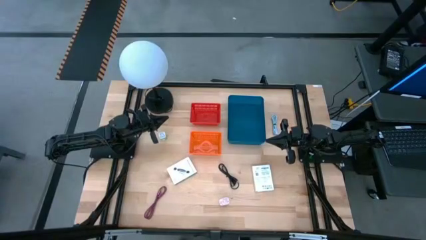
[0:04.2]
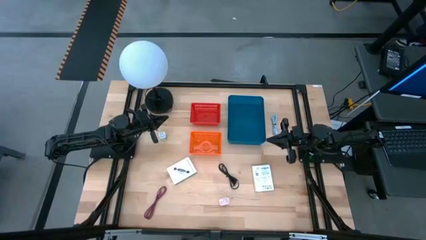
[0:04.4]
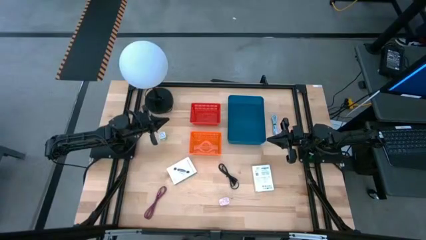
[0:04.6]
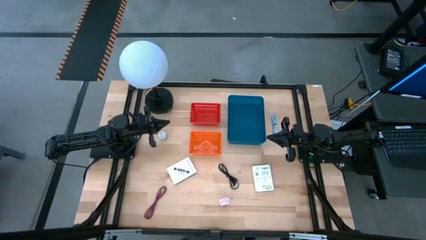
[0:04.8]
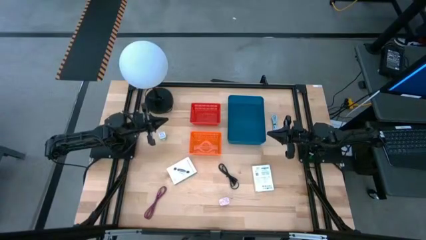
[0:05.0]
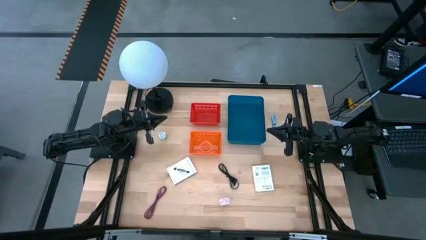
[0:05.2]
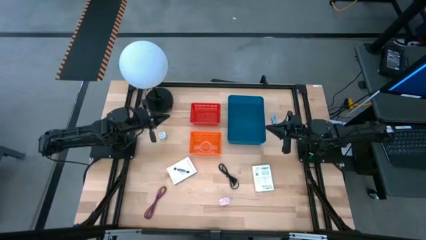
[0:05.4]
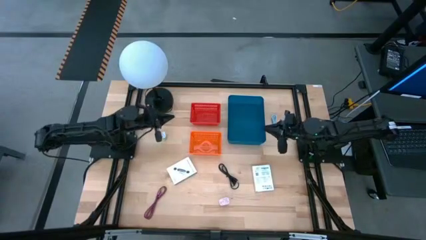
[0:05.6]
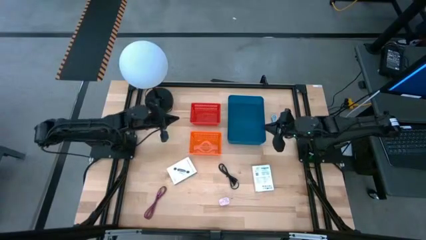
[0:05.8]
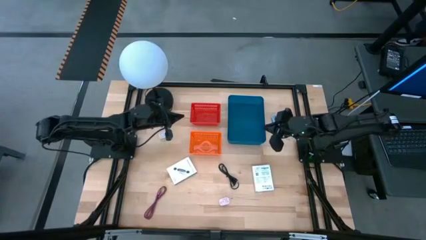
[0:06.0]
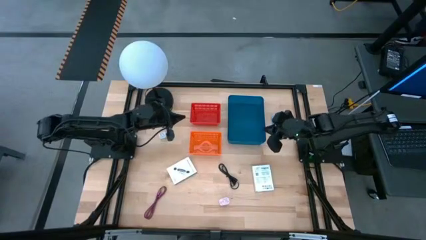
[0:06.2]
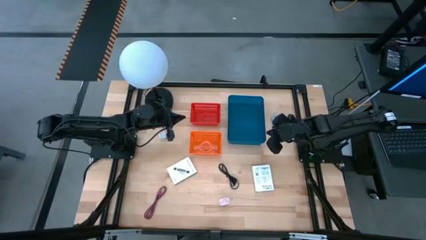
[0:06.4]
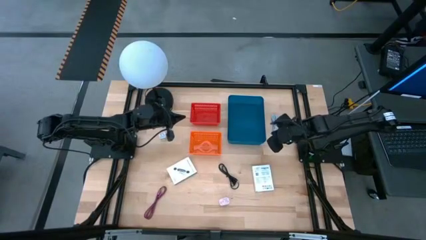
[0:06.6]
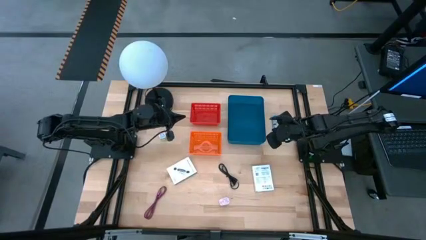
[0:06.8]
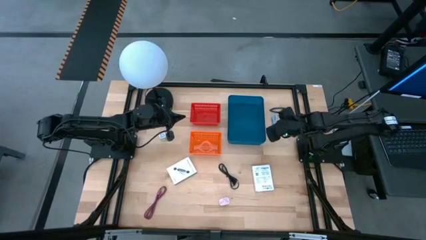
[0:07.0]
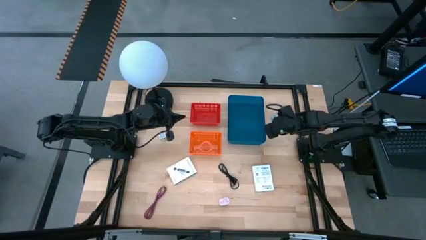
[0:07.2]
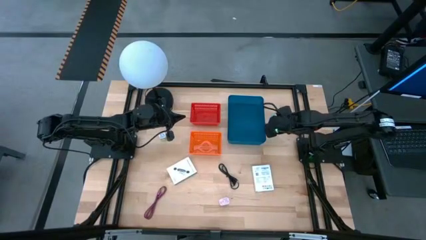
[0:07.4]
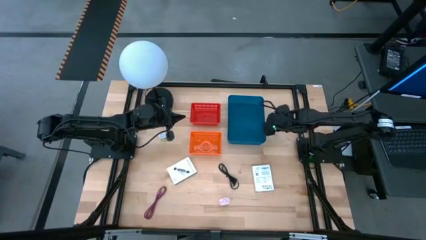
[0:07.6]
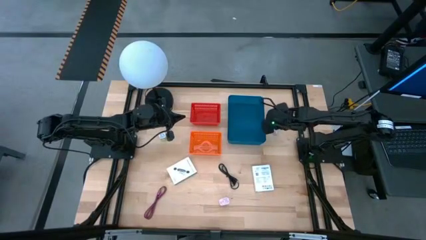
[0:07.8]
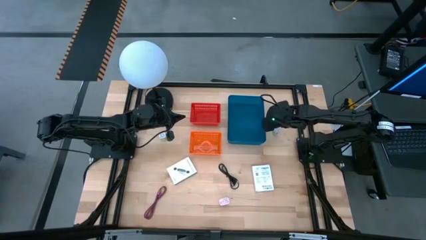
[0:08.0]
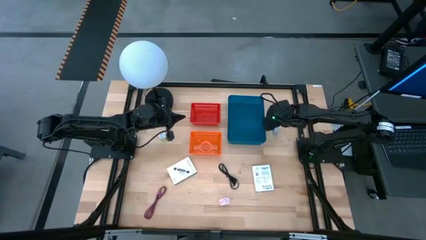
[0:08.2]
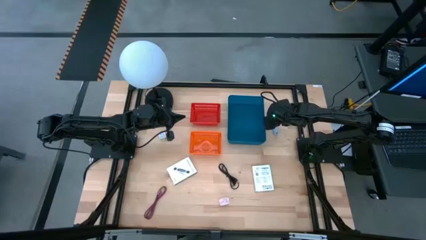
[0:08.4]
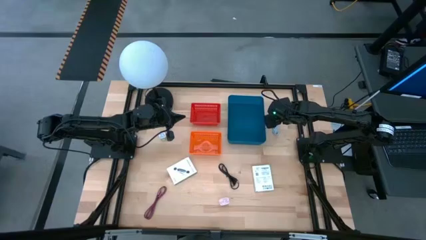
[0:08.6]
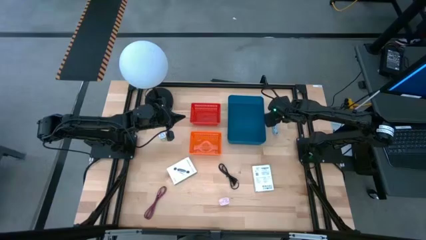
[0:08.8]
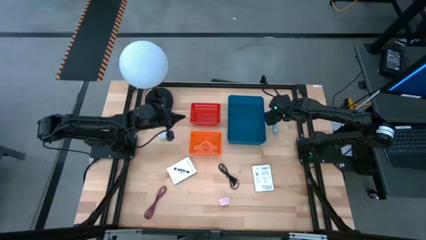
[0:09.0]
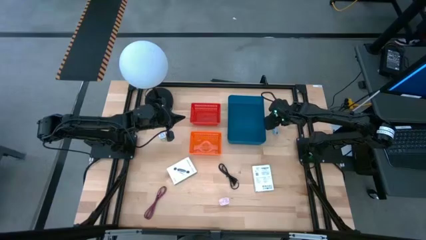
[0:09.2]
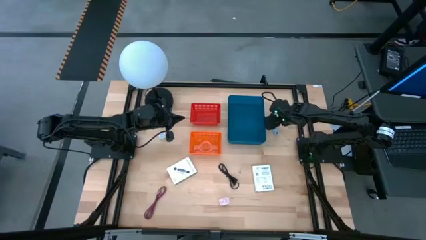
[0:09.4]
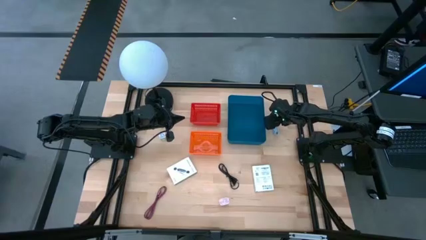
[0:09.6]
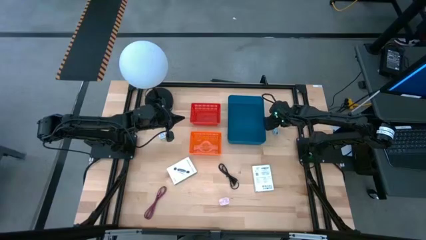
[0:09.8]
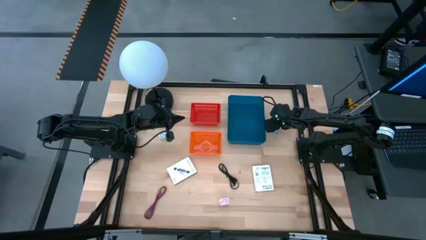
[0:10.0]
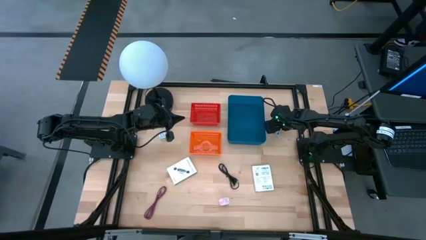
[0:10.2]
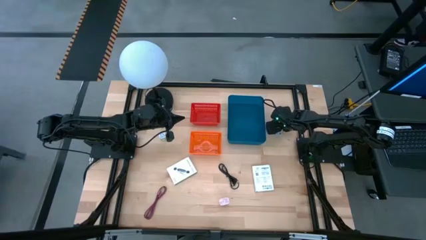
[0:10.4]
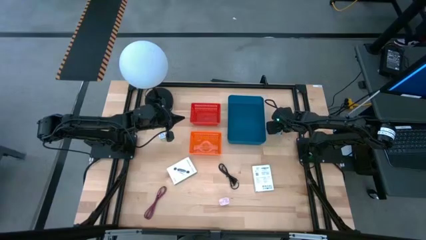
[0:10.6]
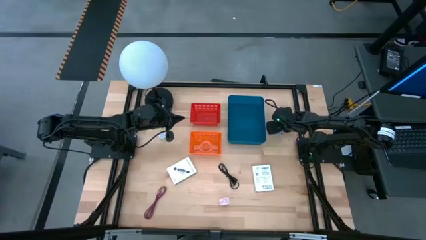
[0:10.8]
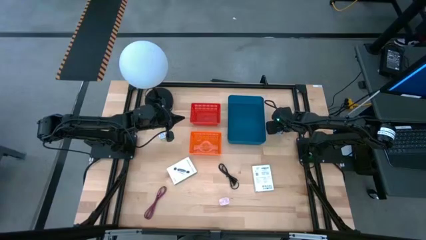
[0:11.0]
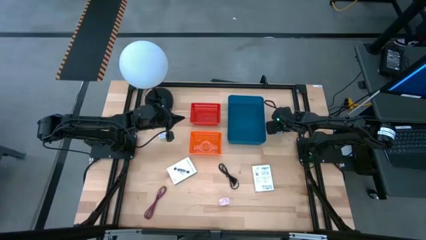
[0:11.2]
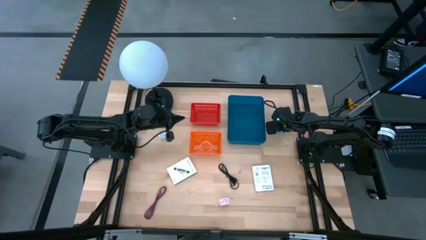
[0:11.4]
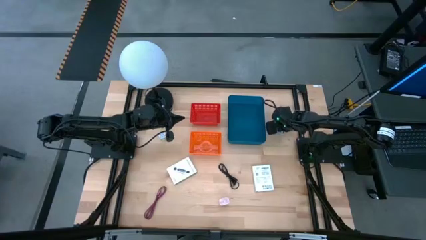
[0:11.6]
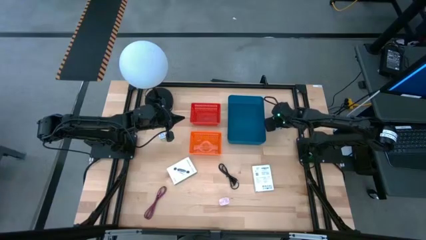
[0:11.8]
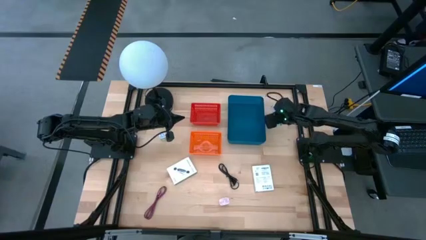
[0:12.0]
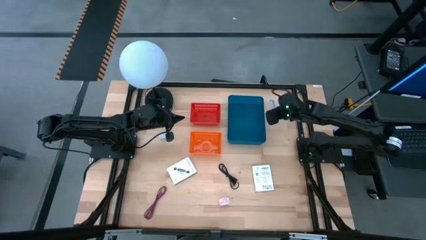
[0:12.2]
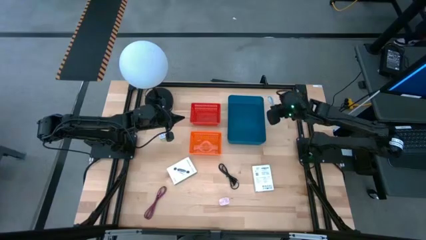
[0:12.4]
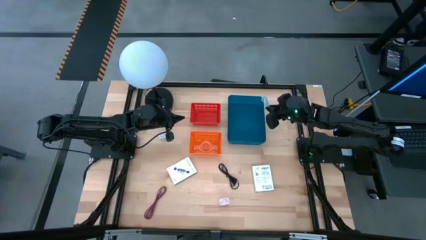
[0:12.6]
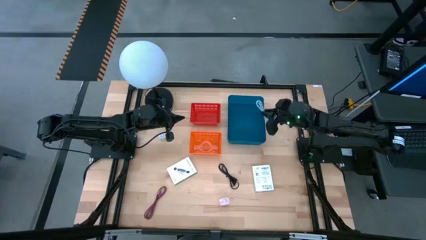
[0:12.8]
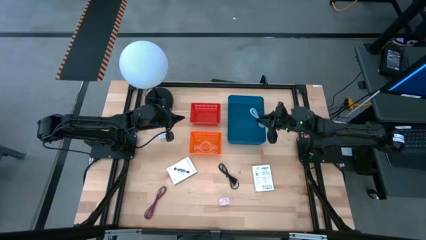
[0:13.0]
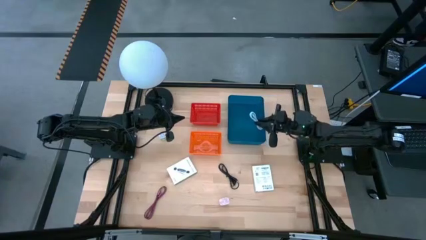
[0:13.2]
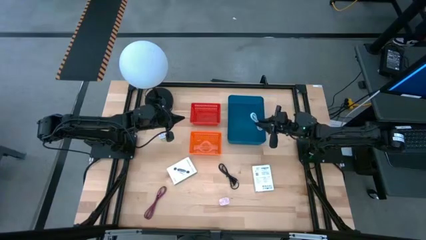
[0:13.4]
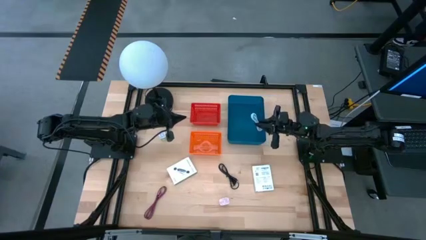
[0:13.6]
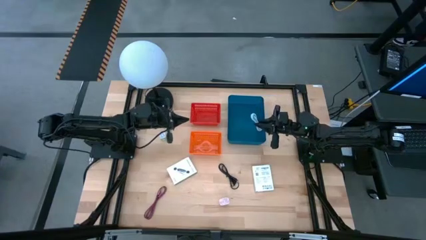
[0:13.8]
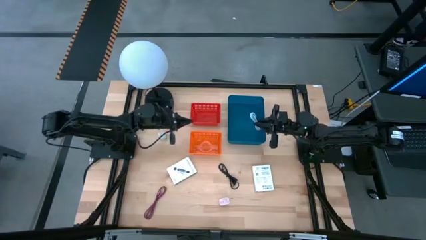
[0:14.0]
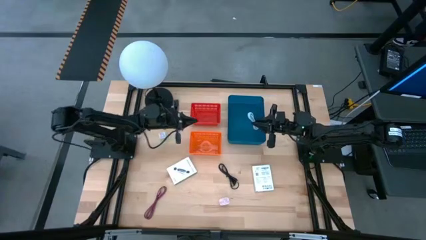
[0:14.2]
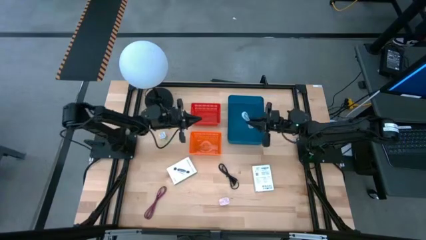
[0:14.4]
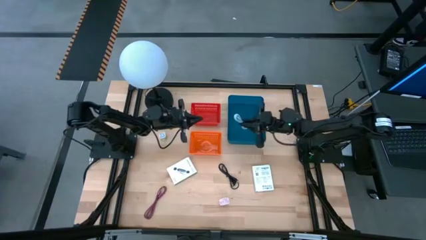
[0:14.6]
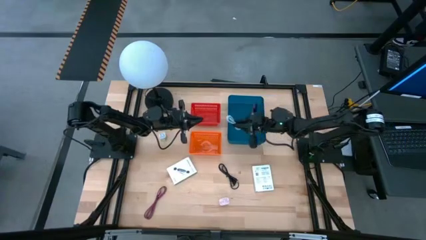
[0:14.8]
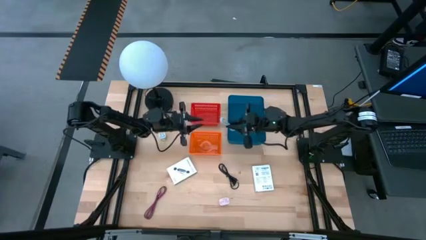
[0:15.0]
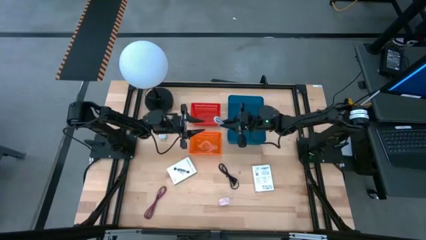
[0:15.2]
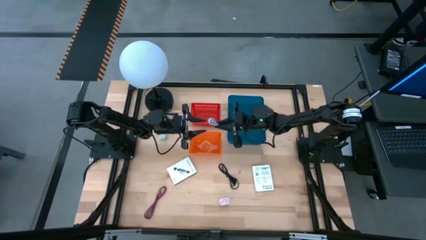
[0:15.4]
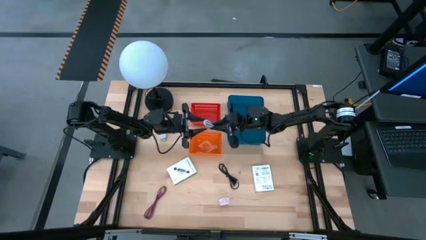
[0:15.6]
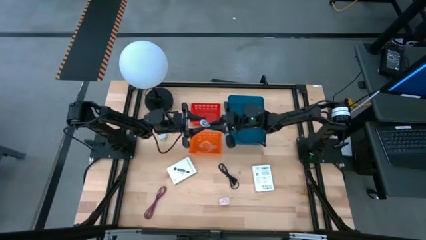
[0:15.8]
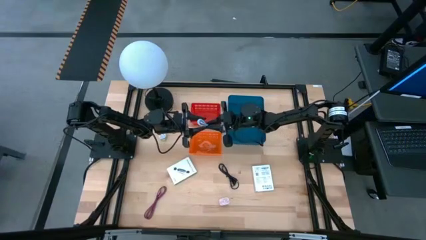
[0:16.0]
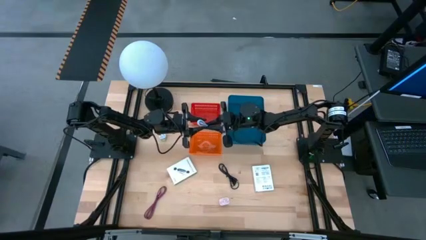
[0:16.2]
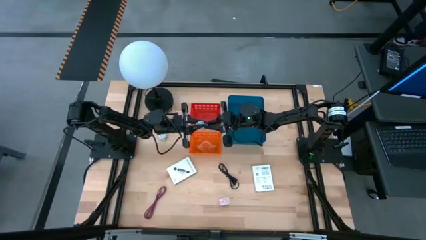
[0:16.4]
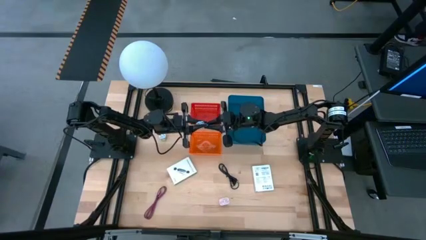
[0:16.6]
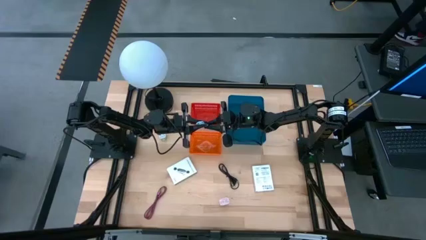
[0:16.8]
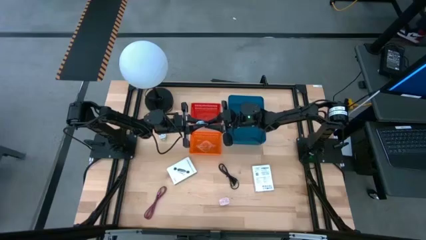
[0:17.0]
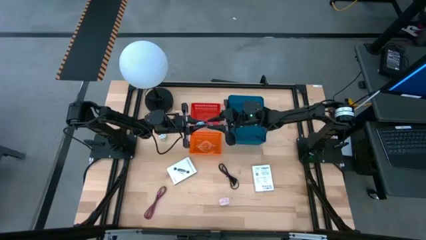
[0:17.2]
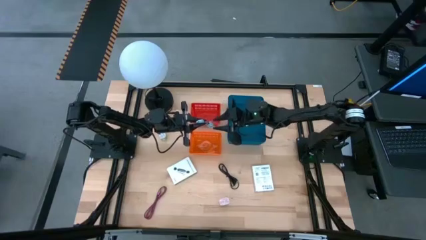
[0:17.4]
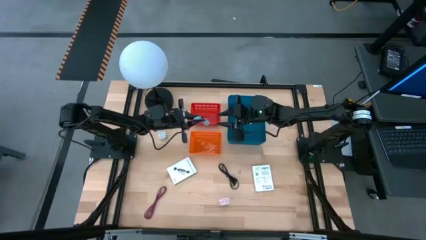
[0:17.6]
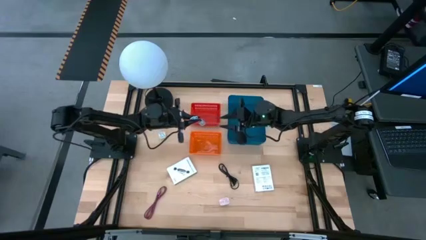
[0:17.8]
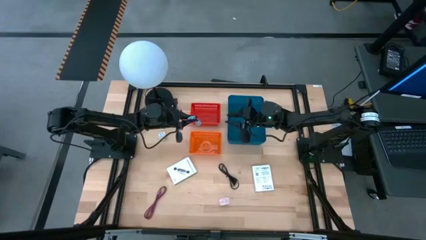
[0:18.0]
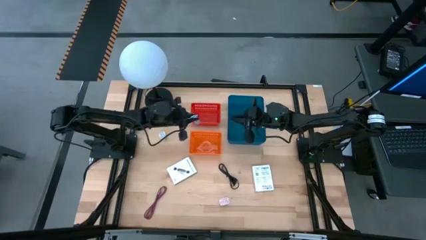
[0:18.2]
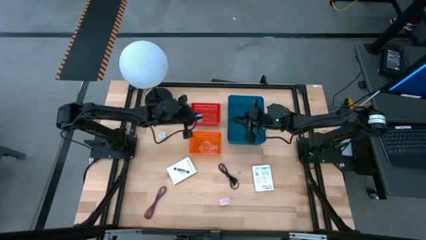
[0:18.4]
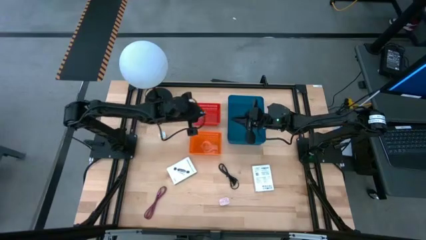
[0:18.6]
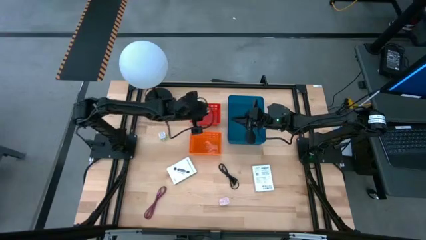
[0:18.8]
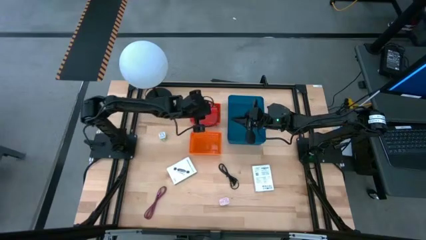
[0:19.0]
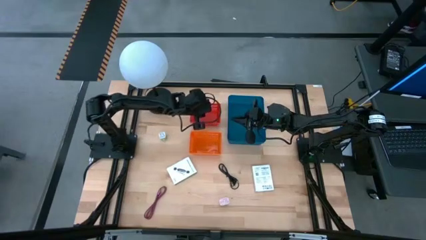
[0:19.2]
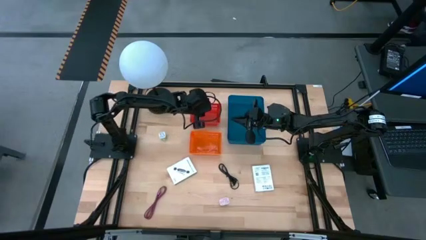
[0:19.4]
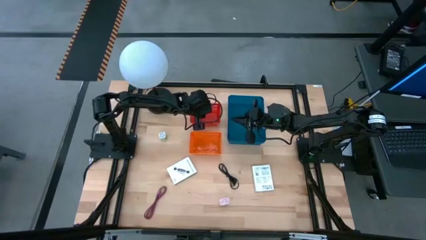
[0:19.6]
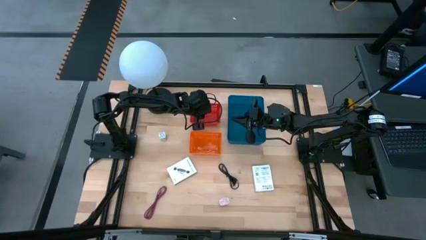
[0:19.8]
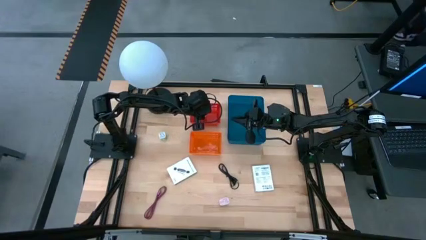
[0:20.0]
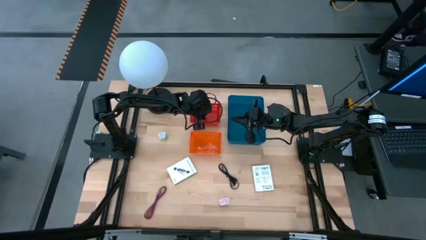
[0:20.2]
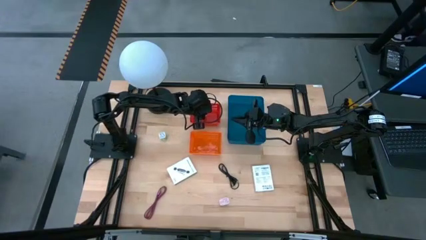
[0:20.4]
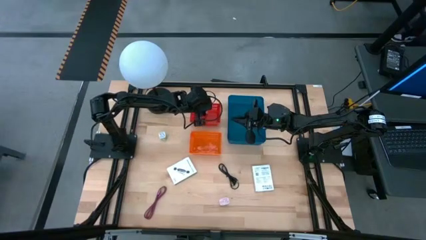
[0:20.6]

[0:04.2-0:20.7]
Task: Pick and place items into bin
Put the light blue charger cable into the red bin
